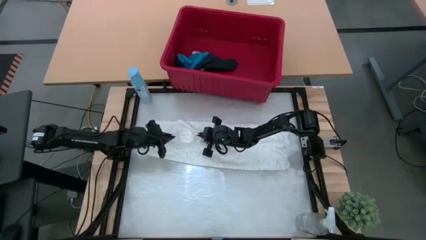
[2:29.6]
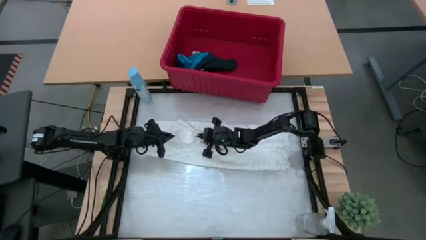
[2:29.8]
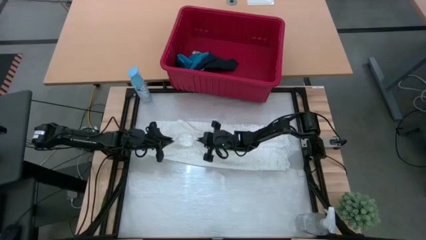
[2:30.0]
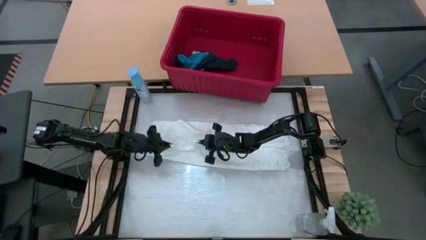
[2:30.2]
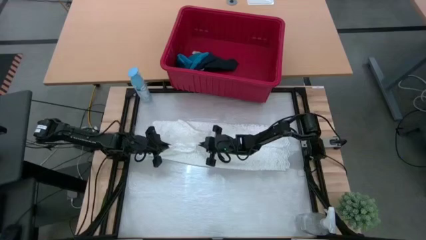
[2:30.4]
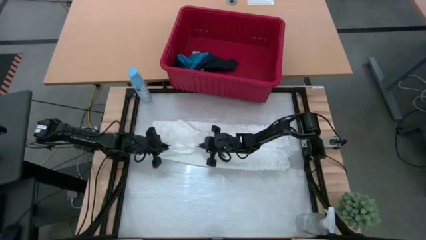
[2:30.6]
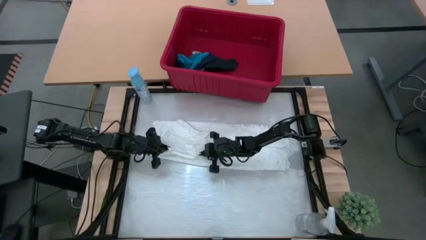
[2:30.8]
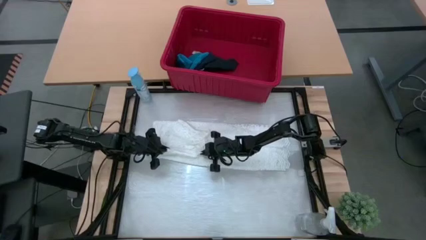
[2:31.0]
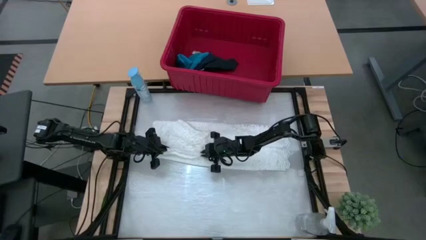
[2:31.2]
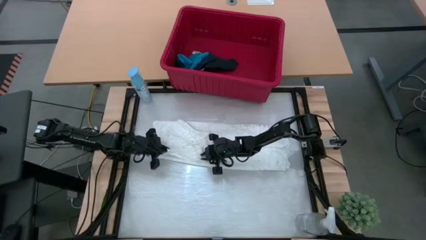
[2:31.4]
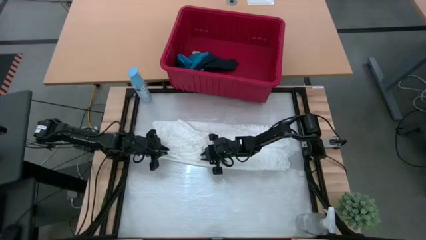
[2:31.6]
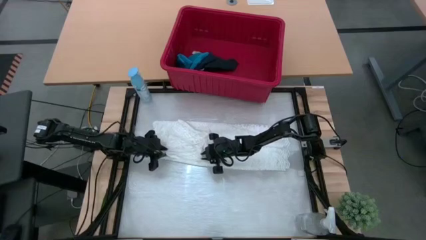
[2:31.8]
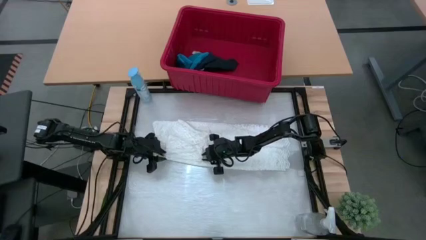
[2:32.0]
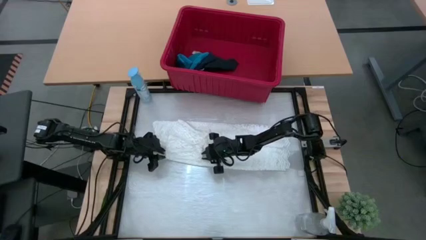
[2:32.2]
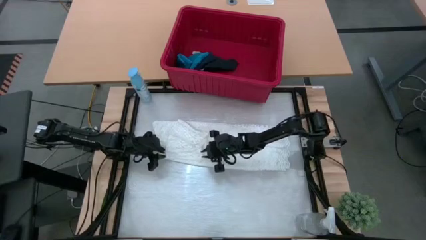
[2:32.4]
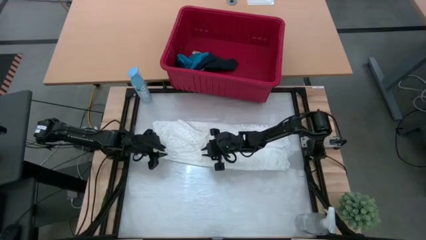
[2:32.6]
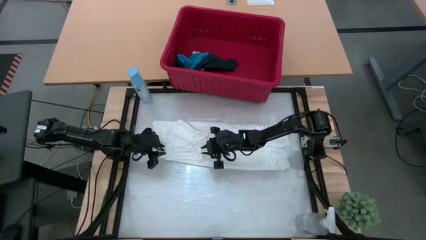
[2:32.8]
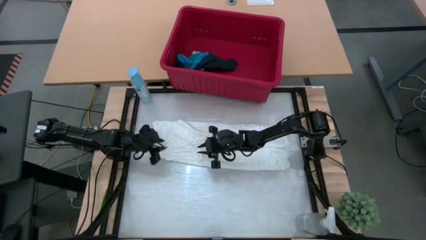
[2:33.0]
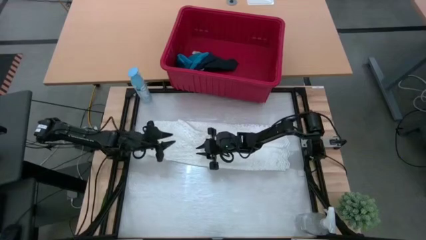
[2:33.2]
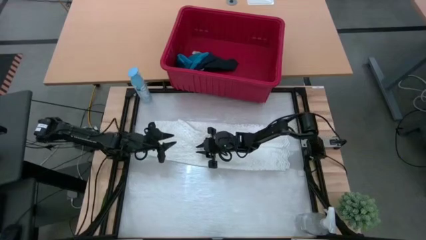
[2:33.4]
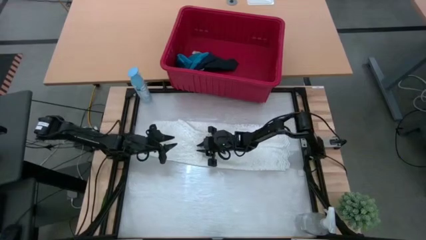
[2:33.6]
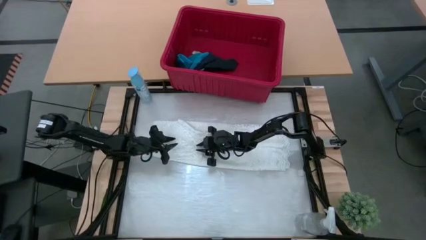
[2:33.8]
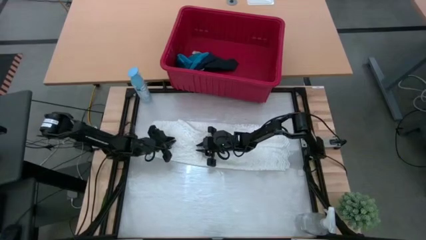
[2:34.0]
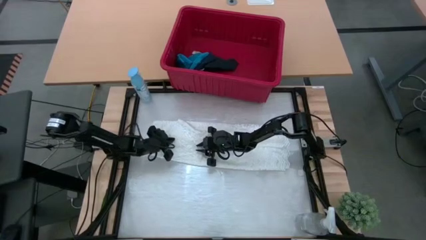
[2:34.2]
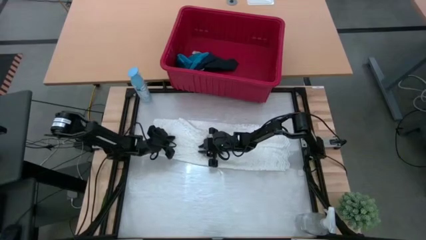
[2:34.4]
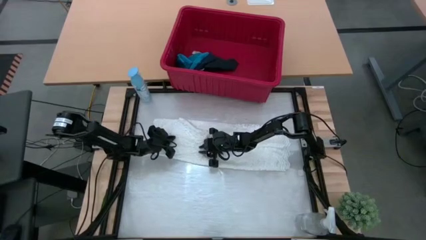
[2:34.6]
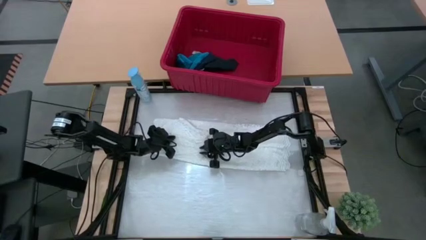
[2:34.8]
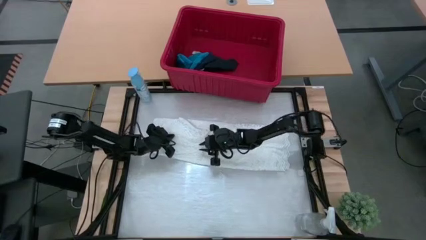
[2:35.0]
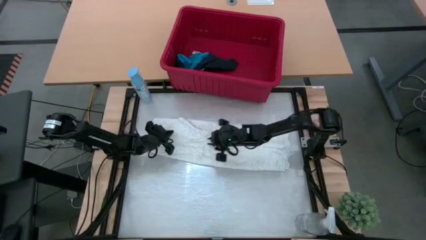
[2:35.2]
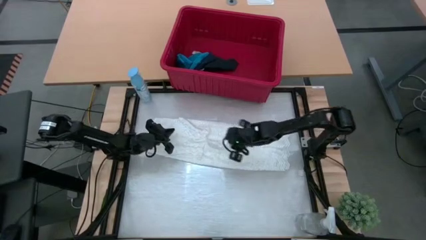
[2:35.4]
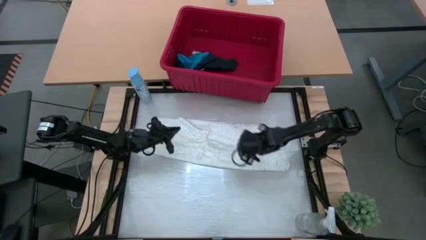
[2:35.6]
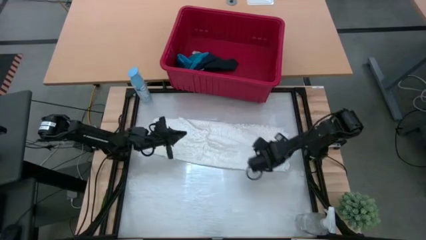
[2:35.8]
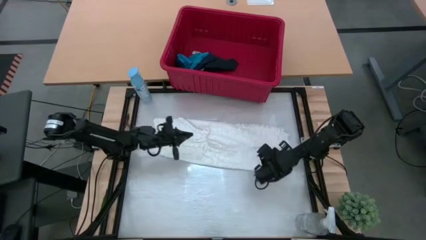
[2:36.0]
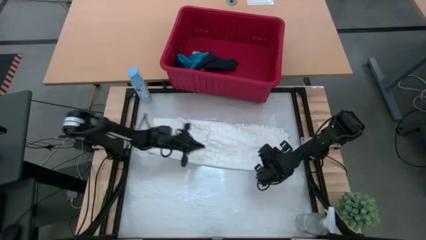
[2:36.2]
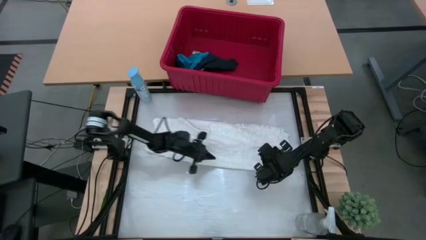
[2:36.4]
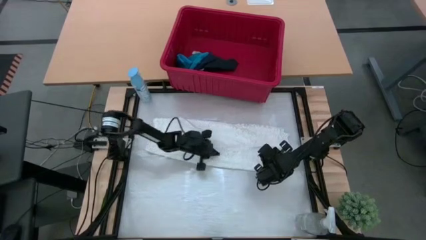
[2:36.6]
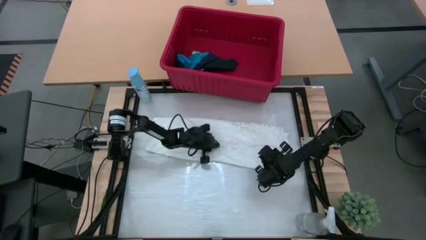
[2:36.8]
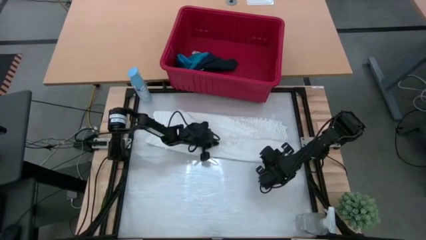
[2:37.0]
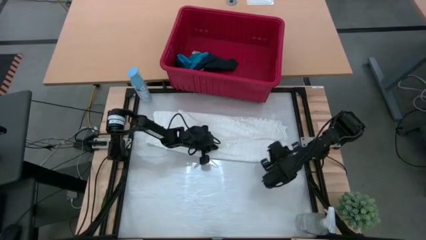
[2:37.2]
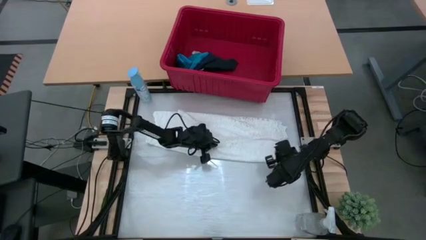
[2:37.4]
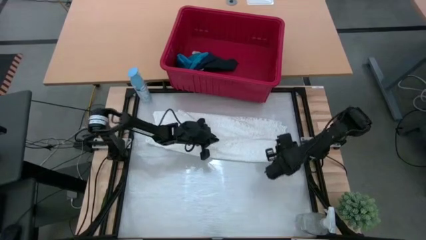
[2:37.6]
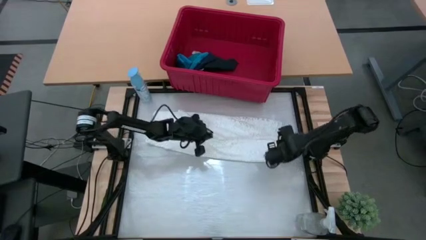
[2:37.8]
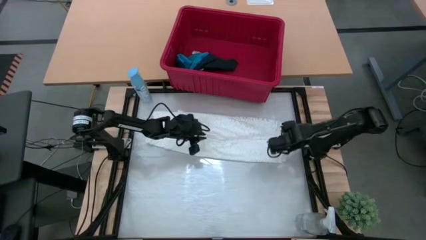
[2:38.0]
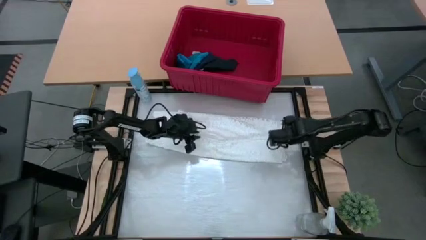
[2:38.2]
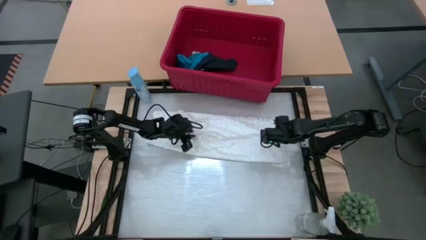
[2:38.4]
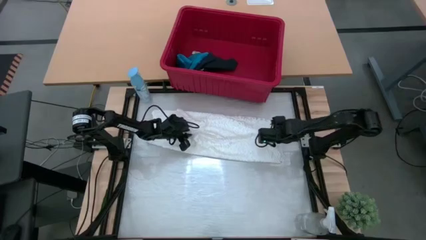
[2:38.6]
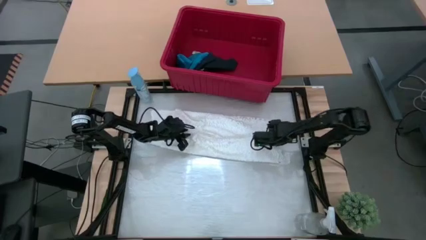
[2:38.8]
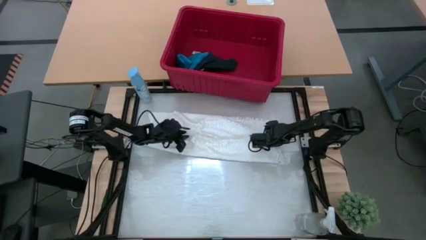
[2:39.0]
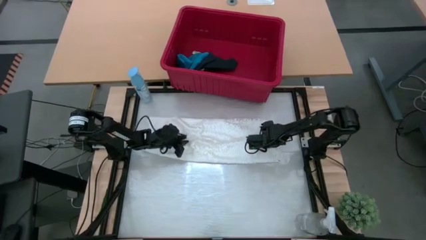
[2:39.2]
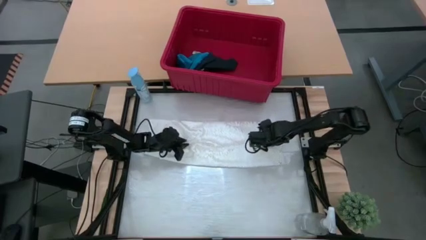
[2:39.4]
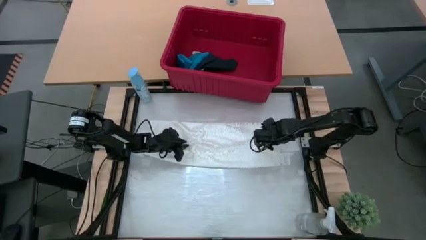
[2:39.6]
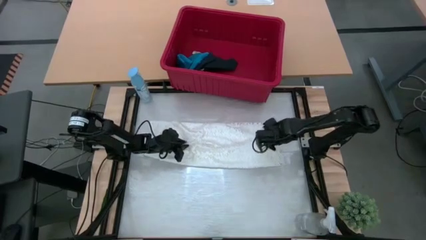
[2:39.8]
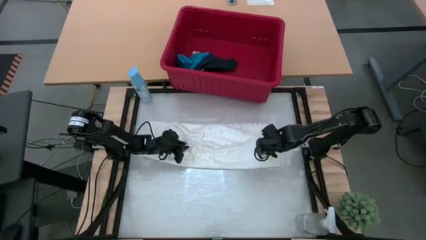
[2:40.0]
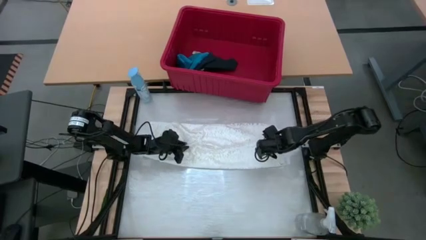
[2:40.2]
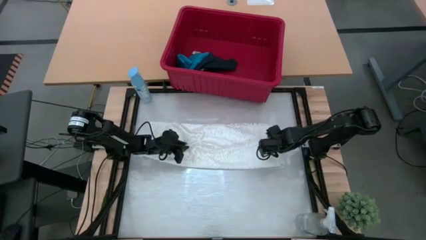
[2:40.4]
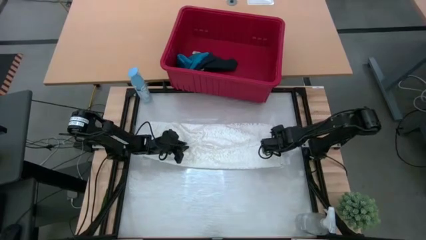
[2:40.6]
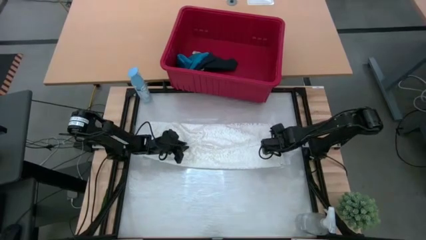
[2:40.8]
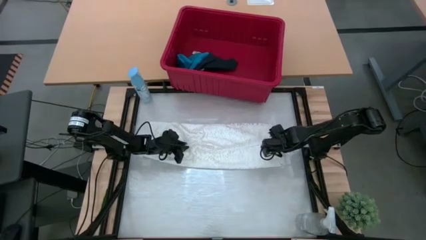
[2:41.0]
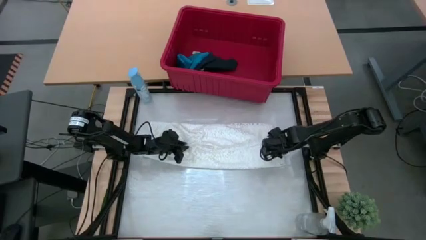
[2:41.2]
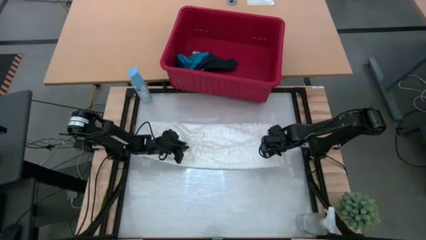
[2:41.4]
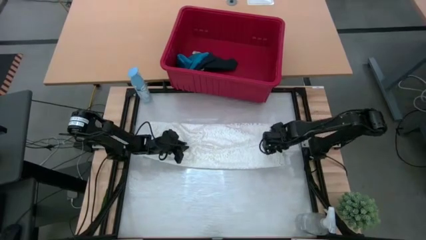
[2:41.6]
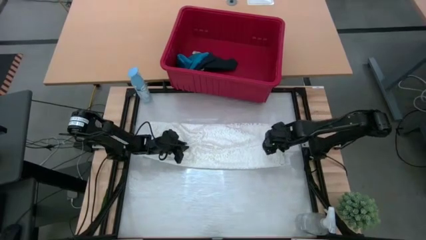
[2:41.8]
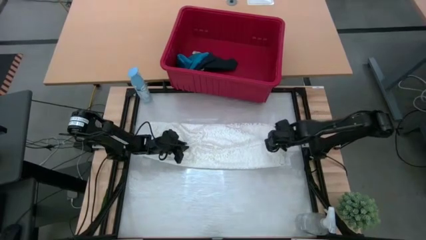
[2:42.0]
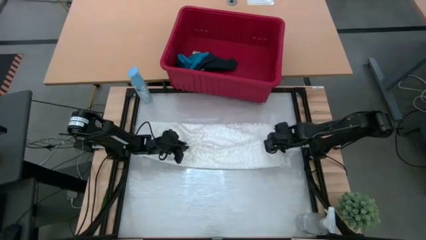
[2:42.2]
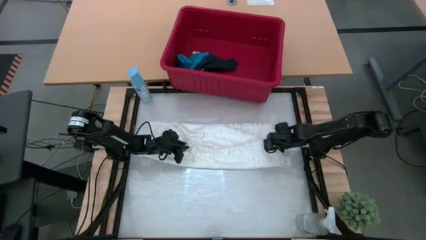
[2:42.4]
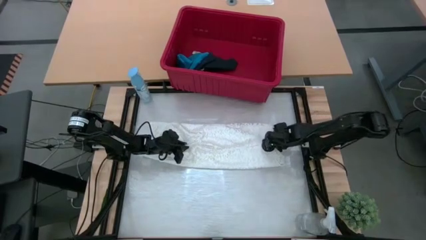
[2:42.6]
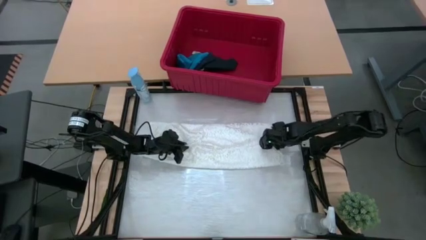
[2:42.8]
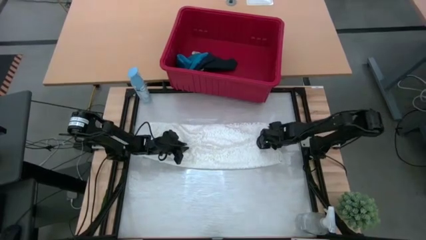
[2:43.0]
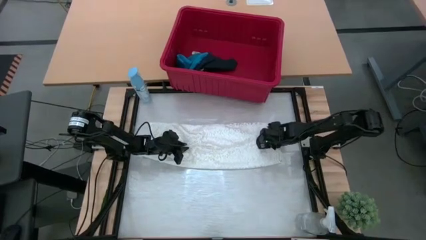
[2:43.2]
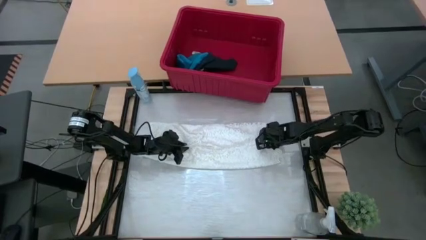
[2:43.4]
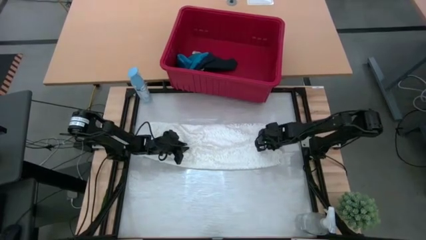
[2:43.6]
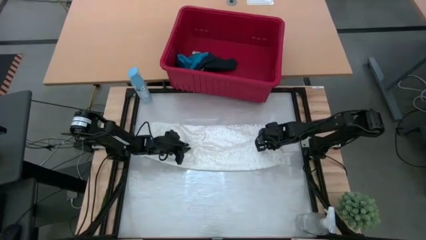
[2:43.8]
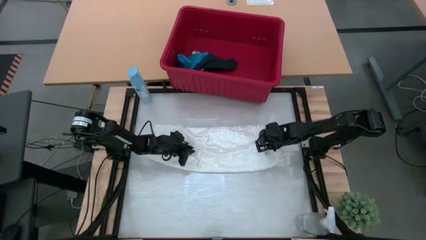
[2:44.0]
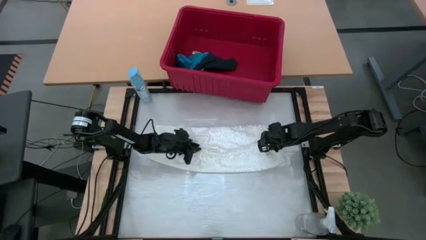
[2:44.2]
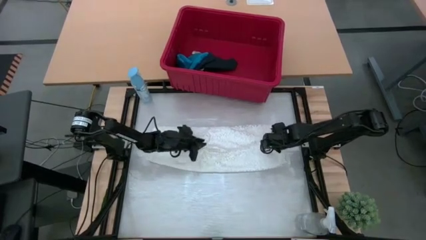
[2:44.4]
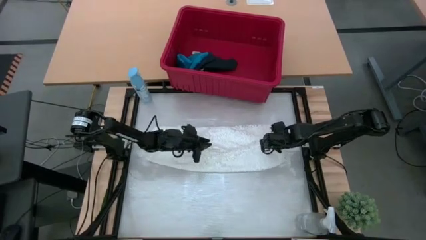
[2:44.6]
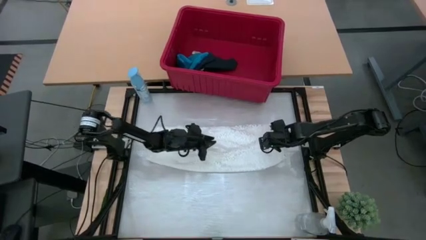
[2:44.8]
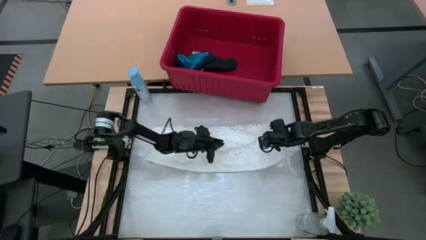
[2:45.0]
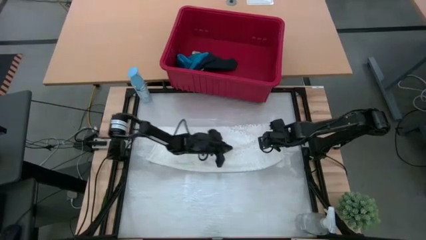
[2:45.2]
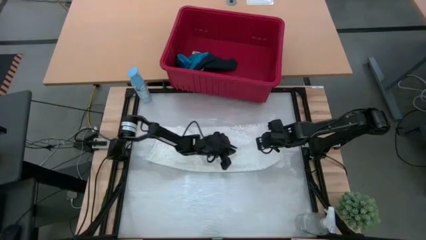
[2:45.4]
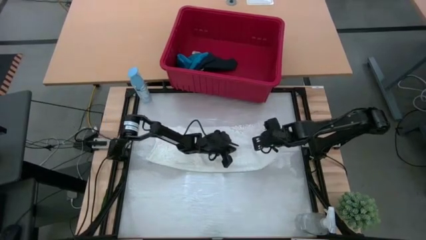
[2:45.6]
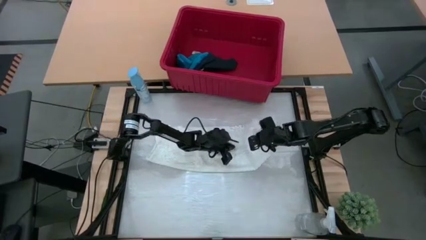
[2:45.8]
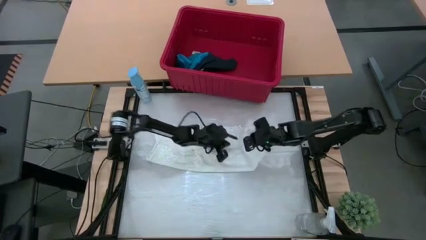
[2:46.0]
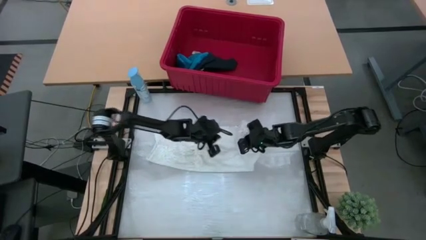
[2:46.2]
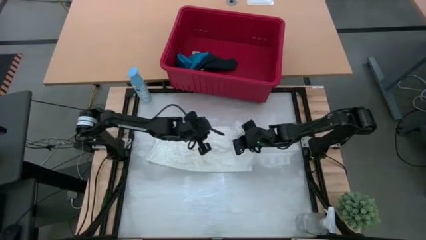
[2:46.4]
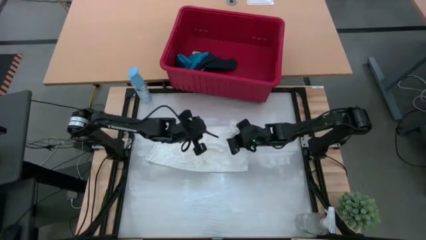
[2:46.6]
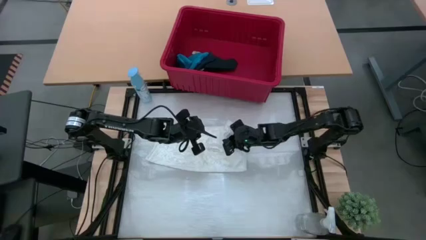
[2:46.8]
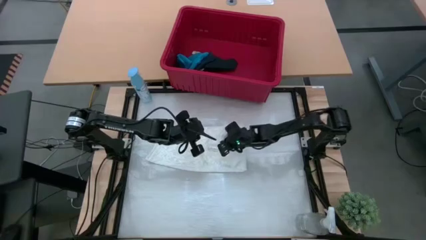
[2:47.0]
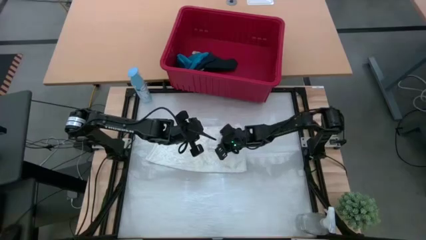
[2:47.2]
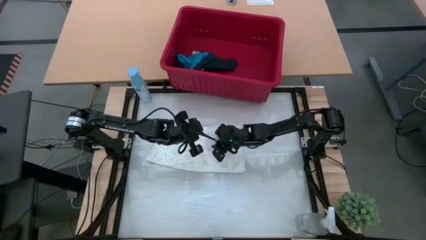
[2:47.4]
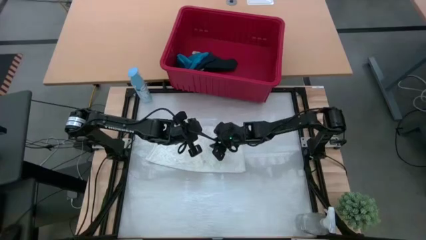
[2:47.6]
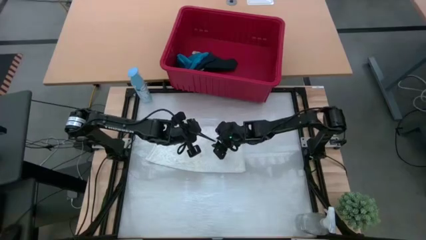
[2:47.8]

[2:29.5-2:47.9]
Task: Fold Laundry from Bin
Fold the white shirt
